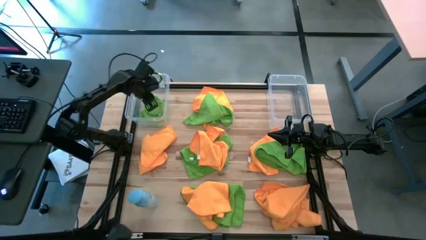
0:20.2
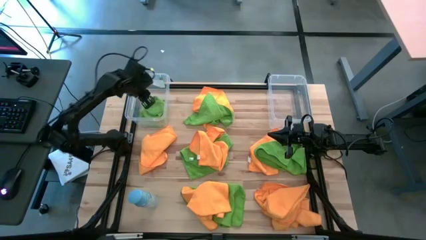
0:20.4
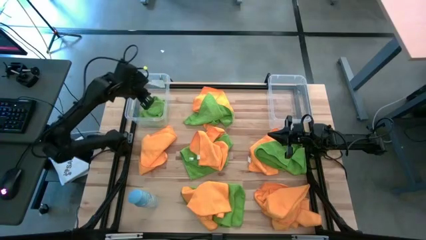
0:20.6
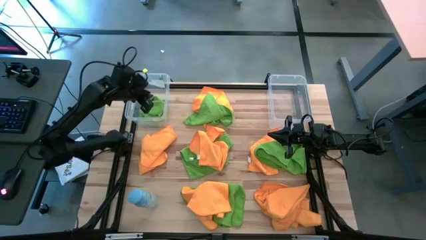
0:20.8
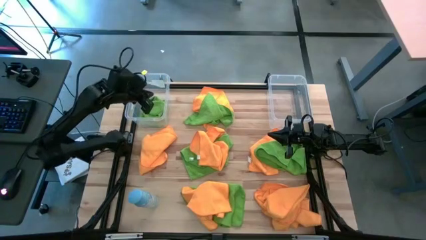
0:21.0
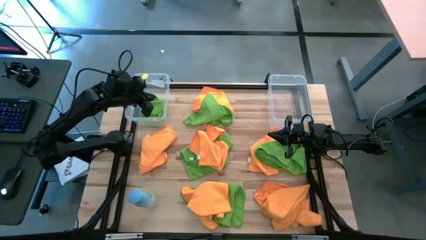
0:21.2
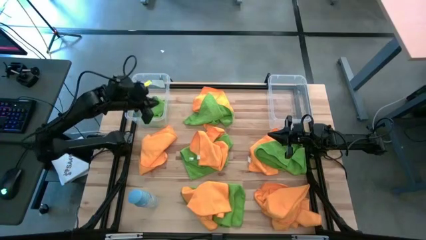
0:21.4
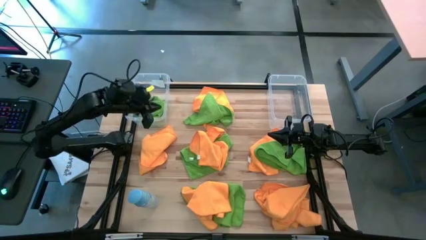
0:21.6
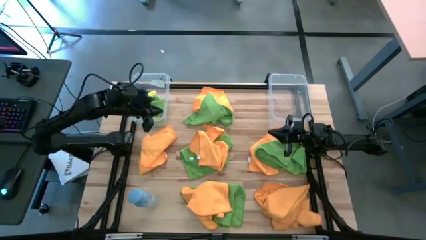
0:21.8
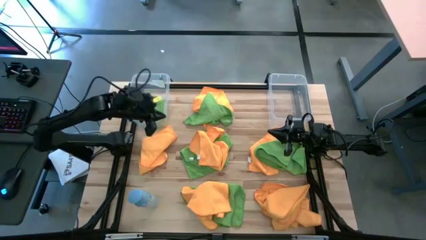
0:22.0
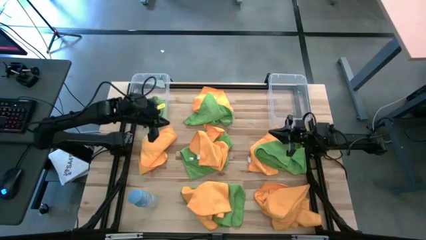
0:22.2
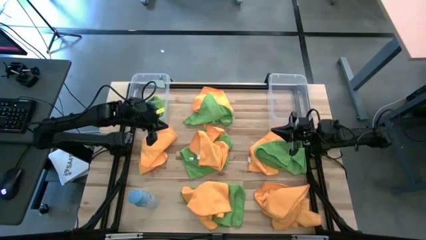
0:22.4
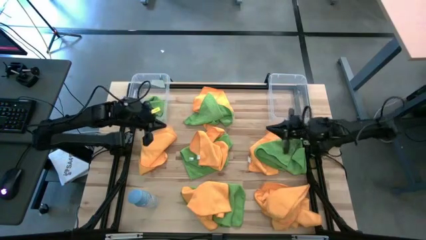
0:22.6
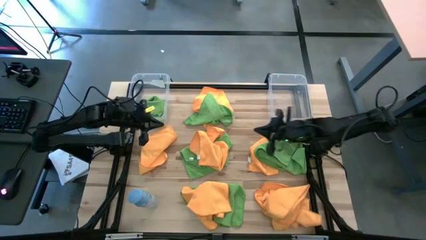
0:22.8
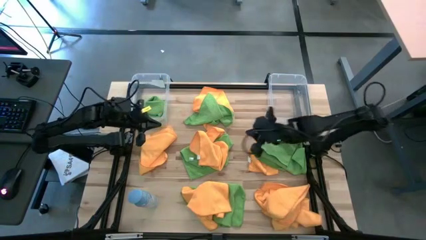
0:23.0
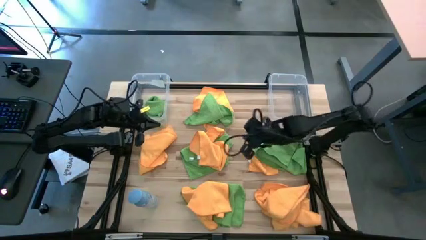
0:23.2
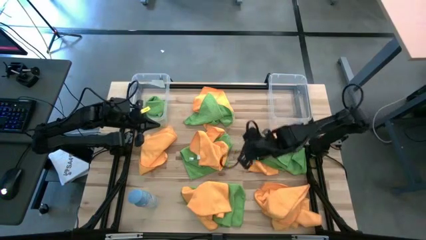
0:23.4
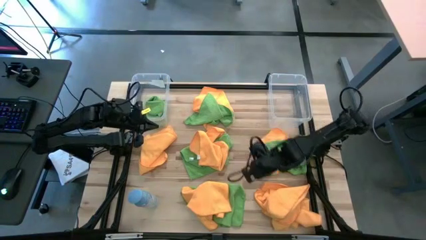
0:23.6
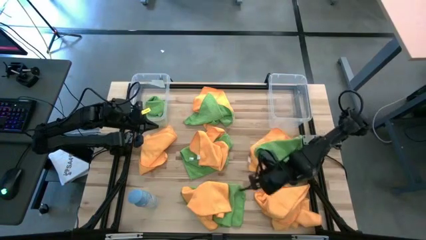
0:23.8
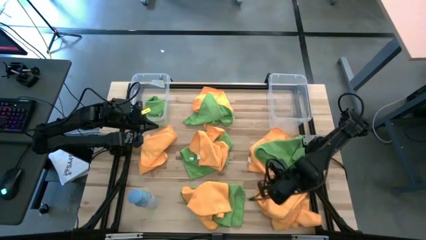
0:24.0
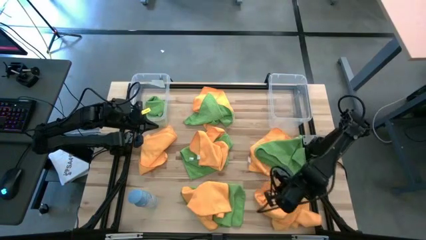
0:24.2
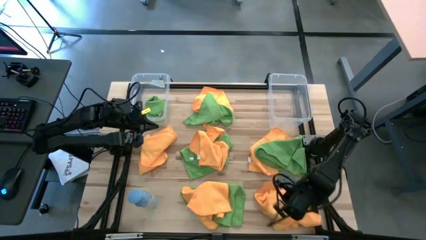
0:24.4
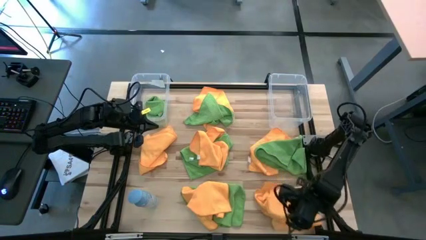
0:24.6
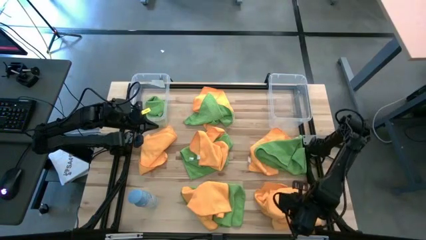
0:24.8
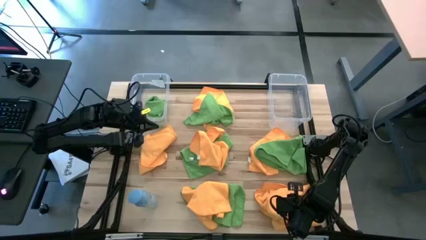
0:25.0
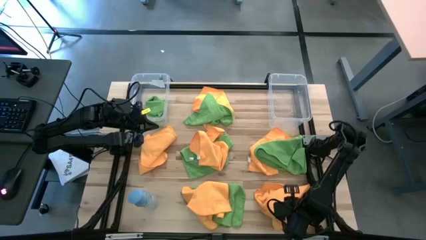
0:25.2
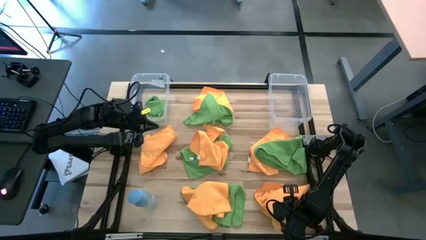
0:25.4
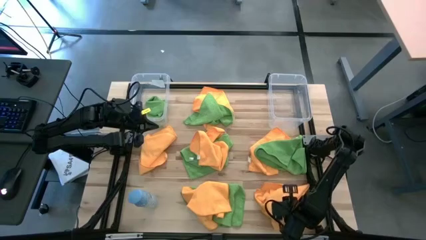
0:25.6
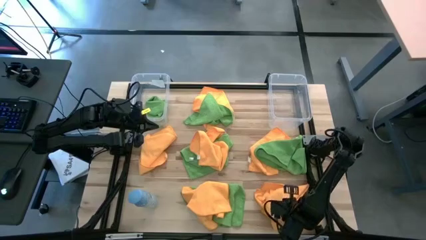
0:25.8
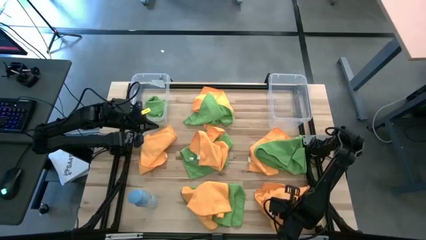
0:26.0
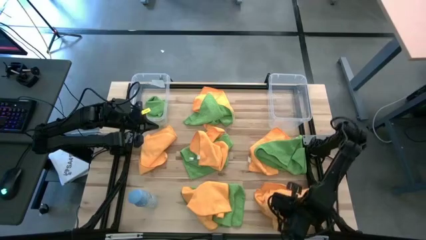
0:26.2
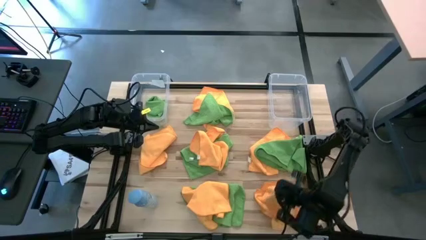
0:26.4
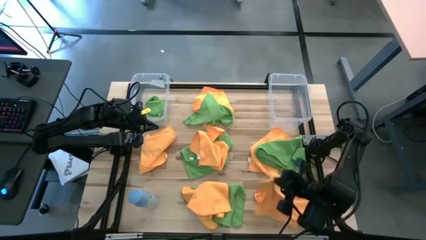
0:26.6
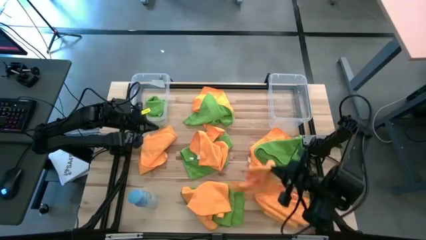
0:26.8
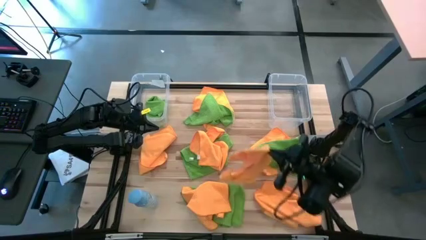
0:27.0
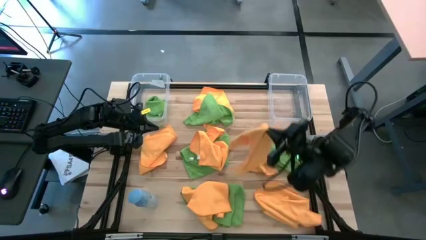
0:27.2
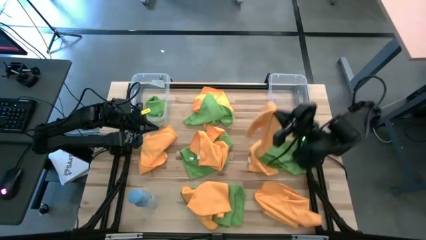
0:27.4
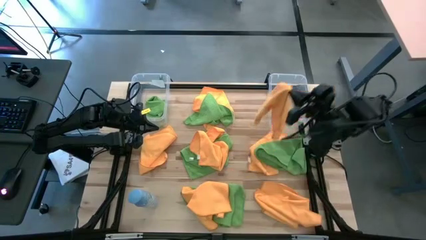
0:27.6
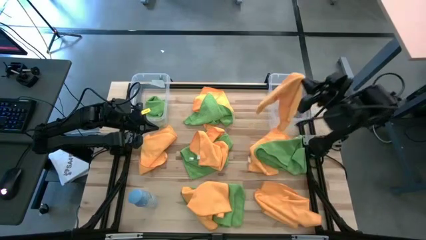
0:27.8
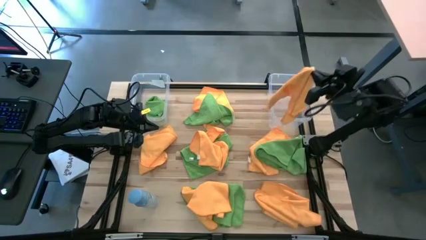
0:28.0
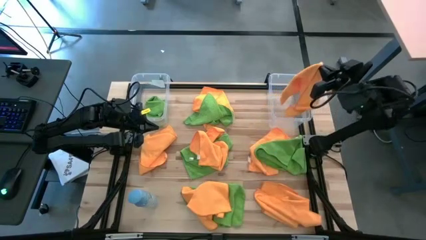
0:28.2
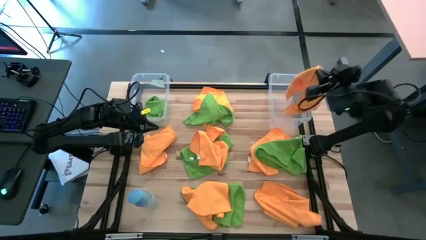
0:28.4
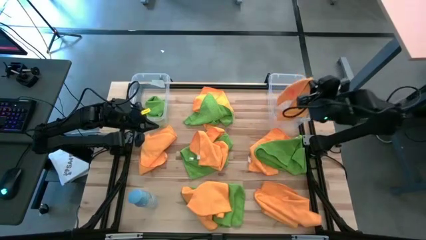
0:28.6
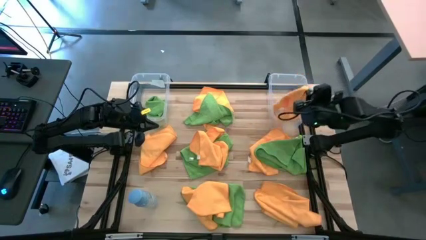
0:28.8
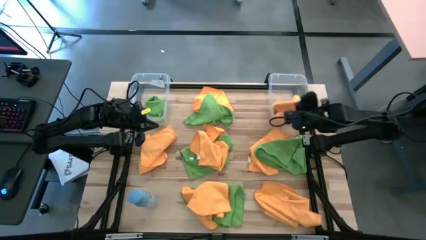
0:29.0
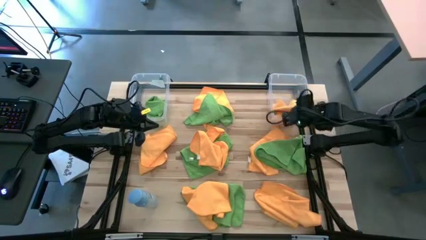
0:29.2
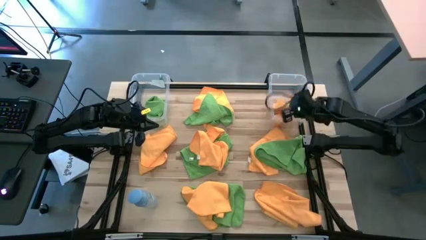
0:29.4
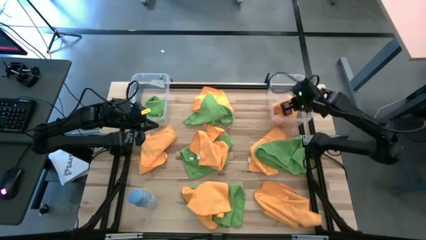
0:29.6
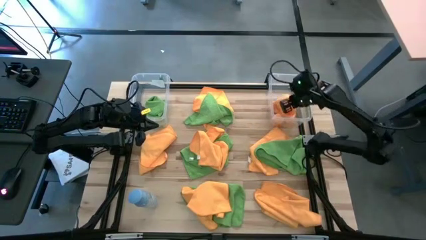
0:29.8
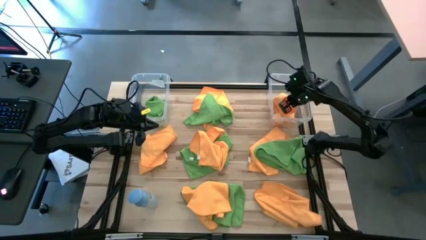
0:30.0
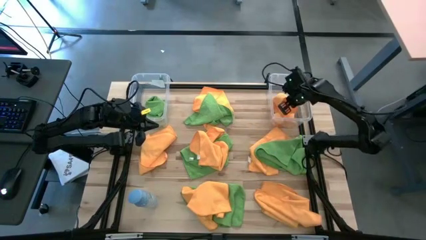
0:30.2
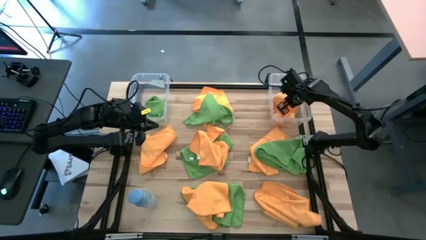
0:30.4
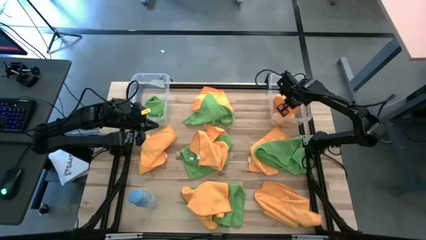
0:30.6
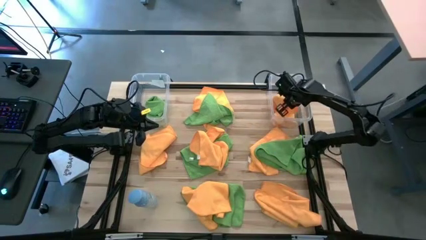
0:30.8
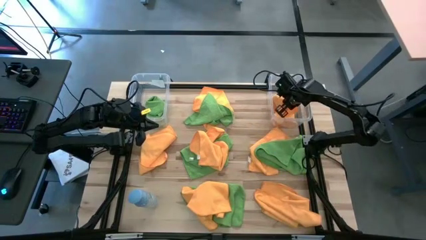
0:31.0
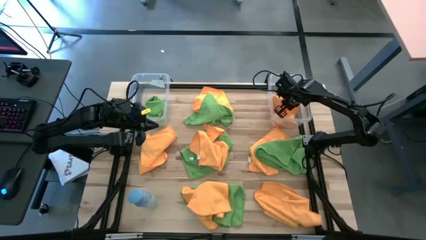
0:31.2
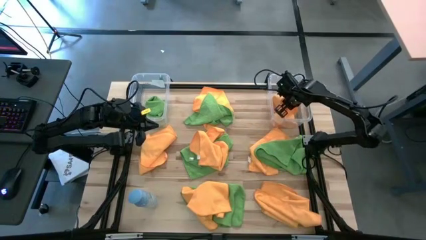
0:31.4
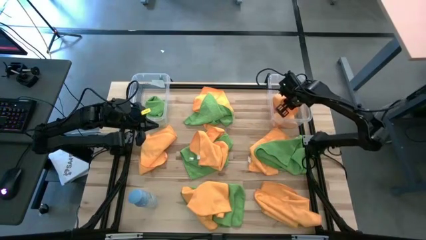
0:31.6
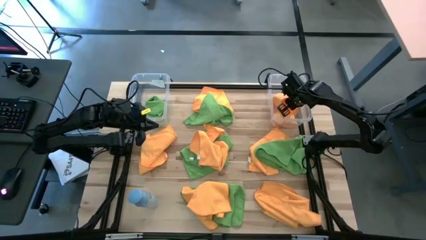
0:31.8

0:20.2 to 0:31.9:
Task: Sort microfiber towel by color & place in baskets
Put the orange microfiber towel into the right transparent bin
